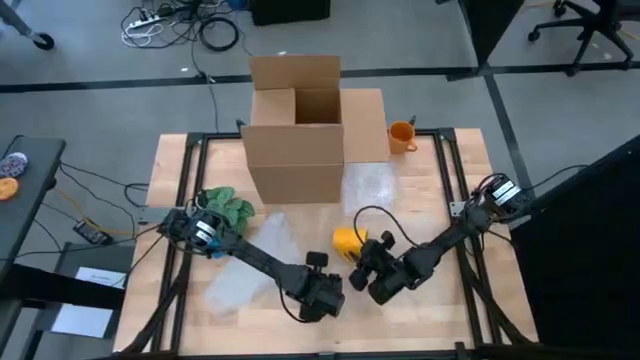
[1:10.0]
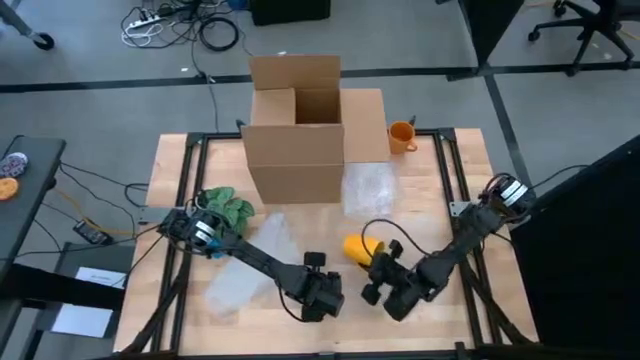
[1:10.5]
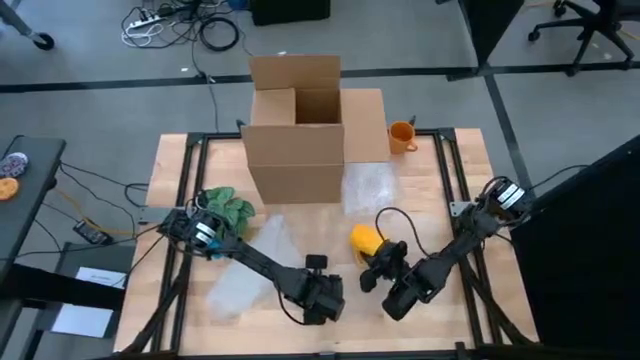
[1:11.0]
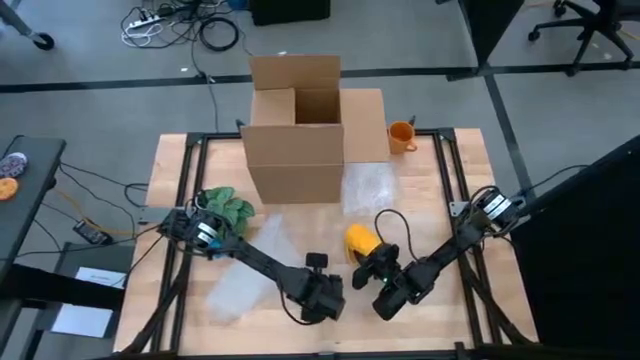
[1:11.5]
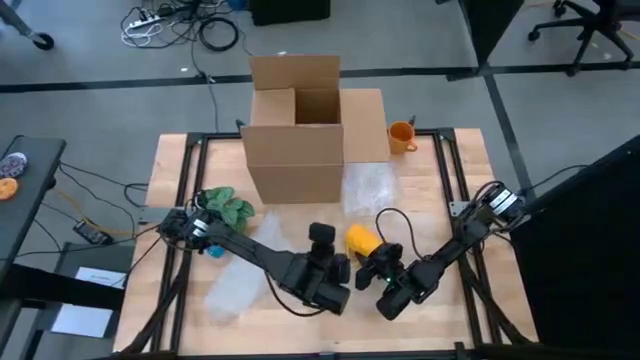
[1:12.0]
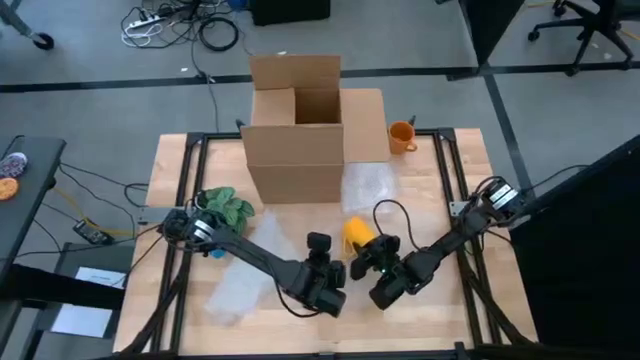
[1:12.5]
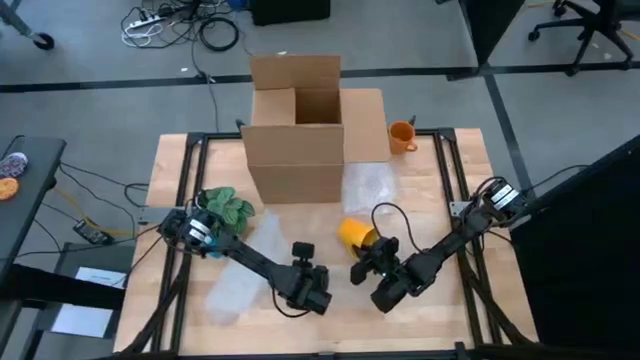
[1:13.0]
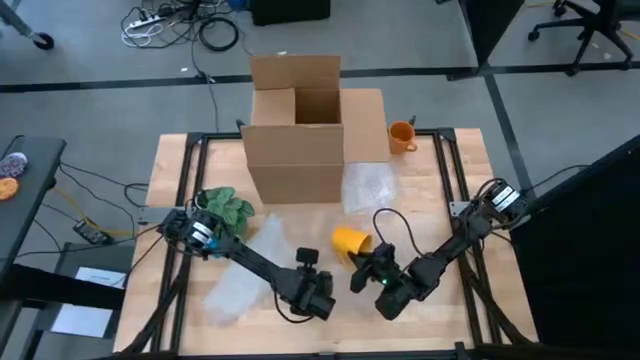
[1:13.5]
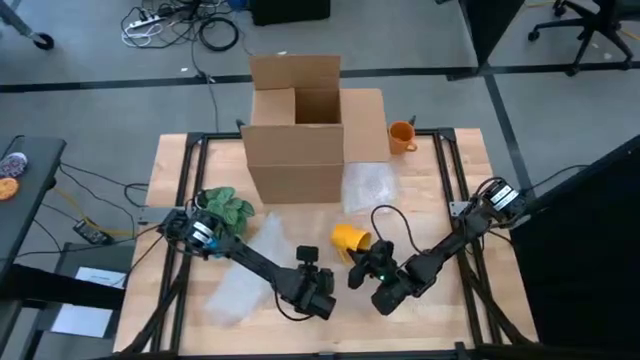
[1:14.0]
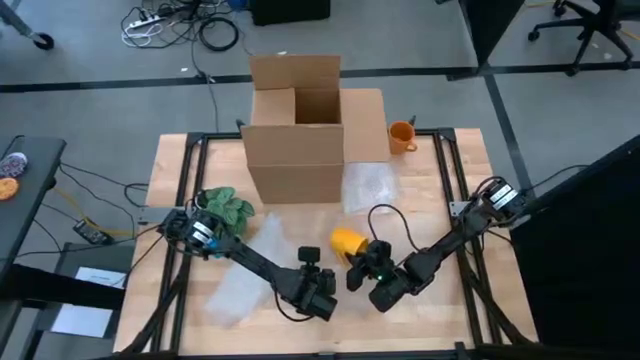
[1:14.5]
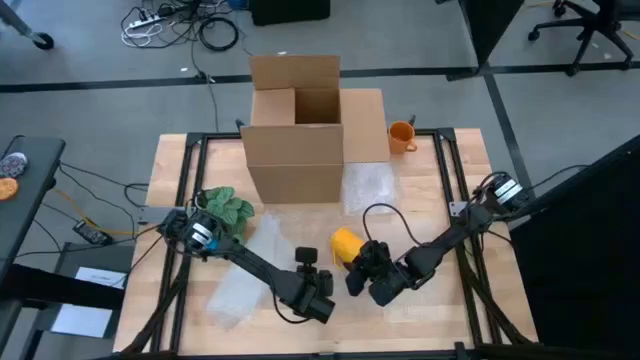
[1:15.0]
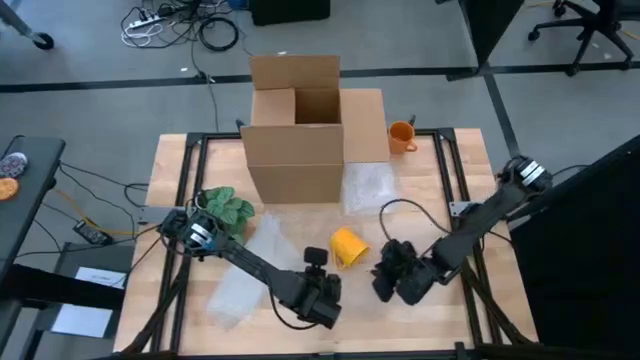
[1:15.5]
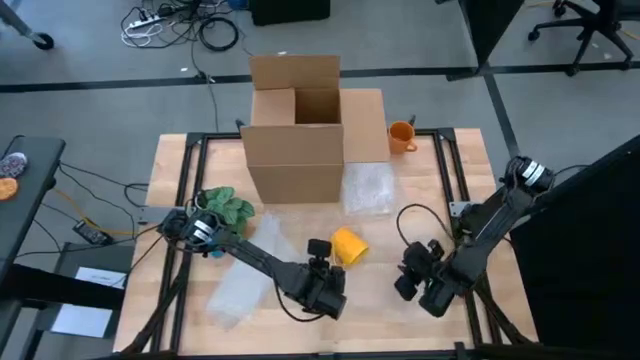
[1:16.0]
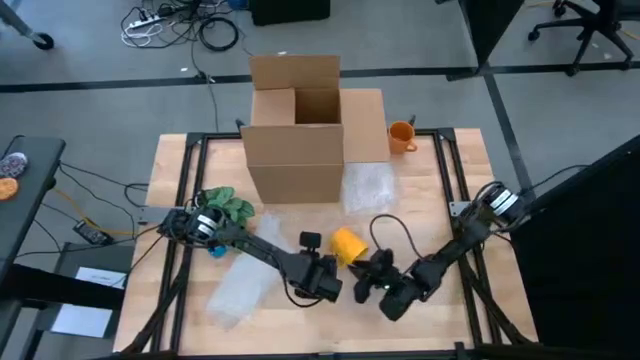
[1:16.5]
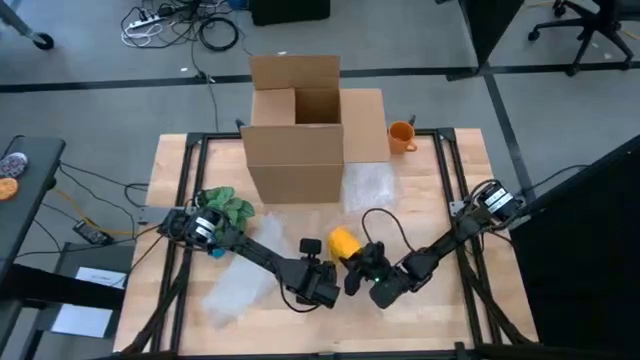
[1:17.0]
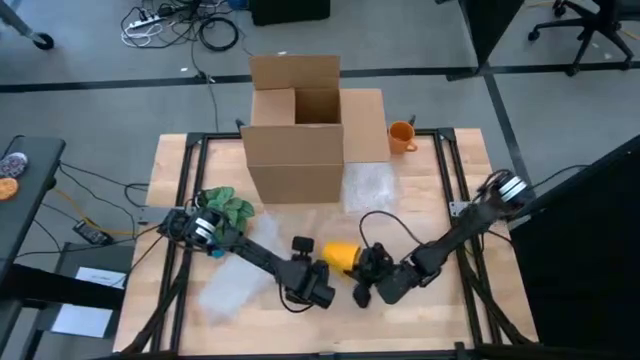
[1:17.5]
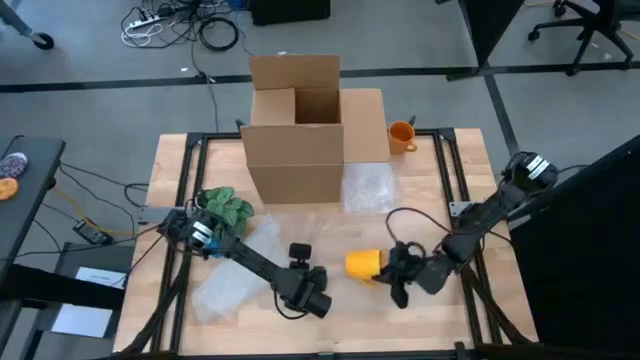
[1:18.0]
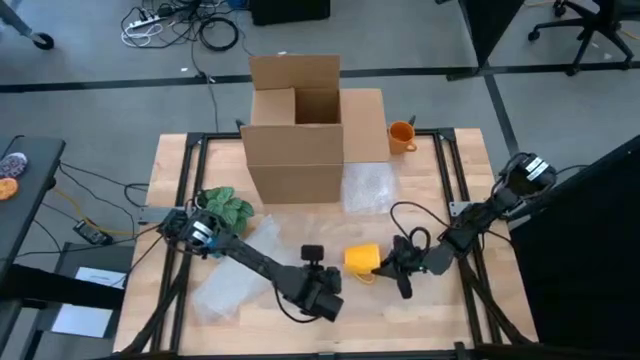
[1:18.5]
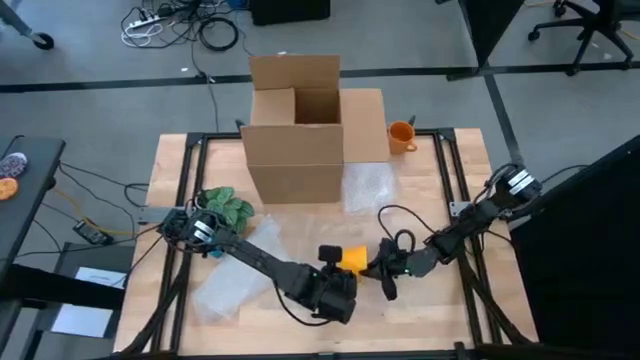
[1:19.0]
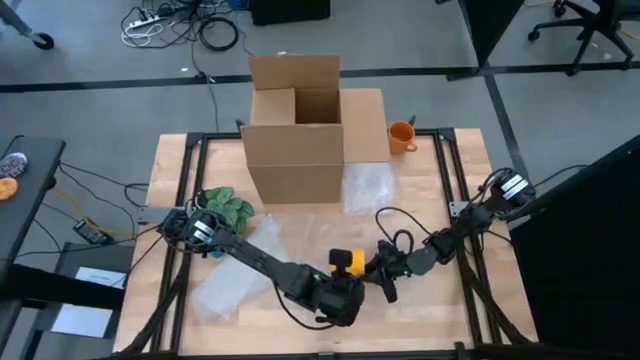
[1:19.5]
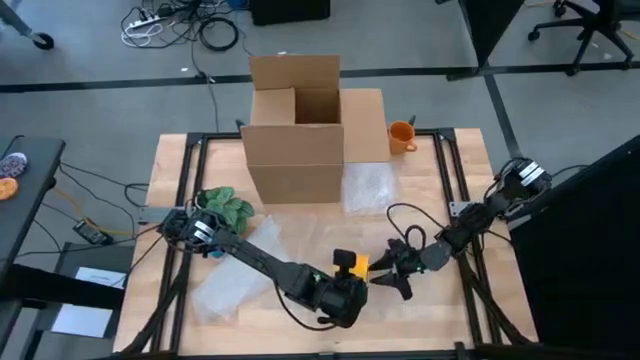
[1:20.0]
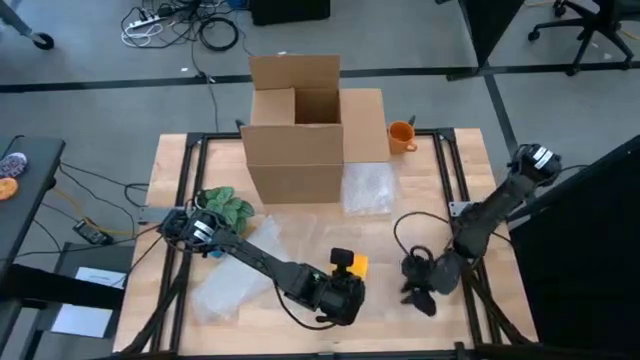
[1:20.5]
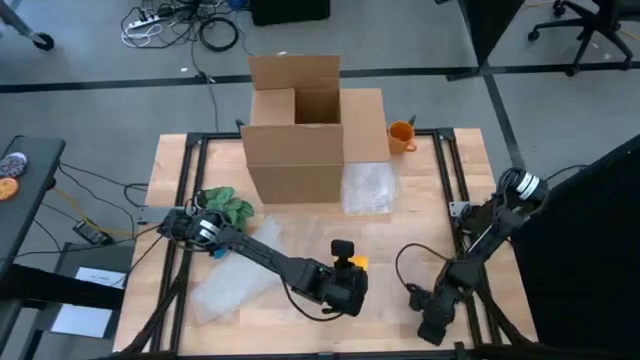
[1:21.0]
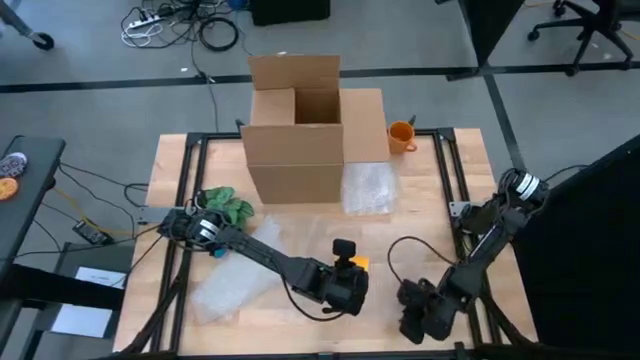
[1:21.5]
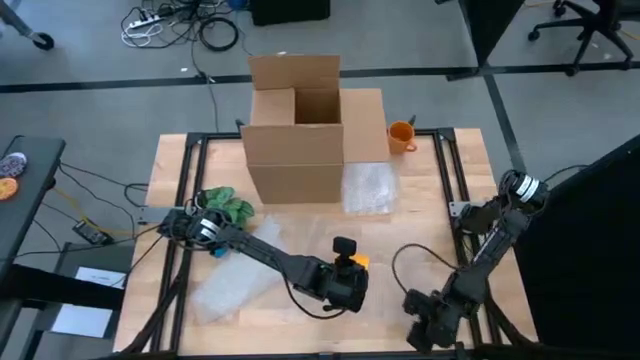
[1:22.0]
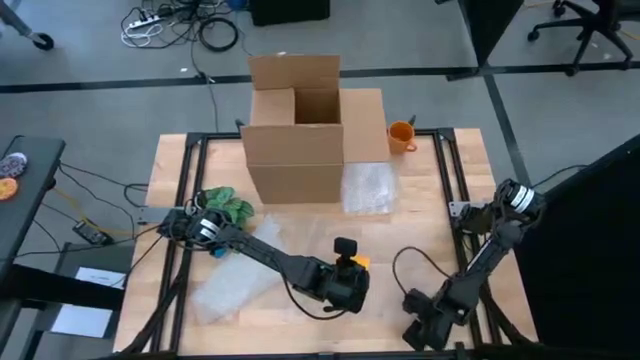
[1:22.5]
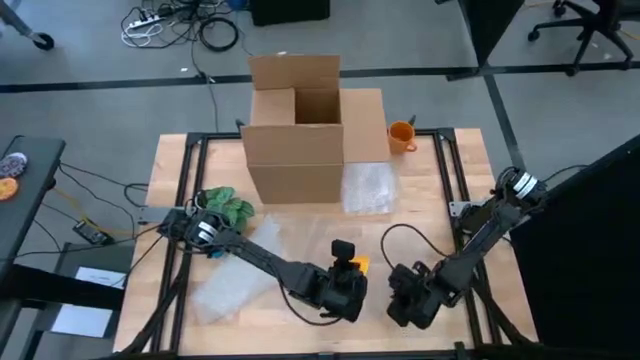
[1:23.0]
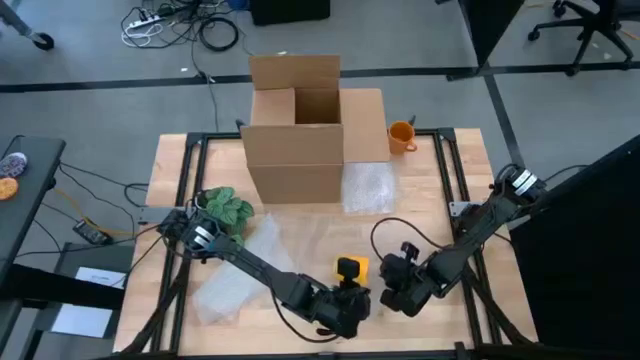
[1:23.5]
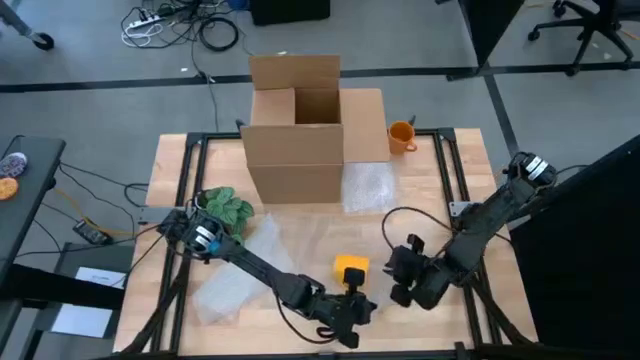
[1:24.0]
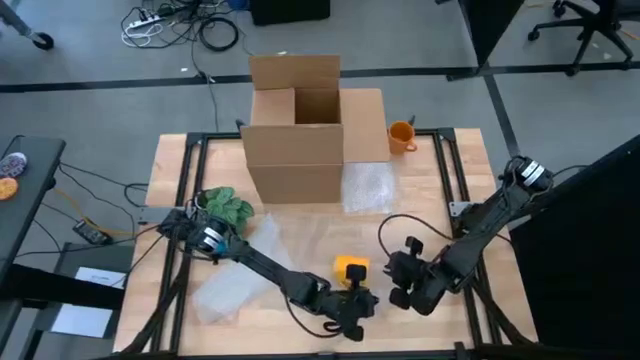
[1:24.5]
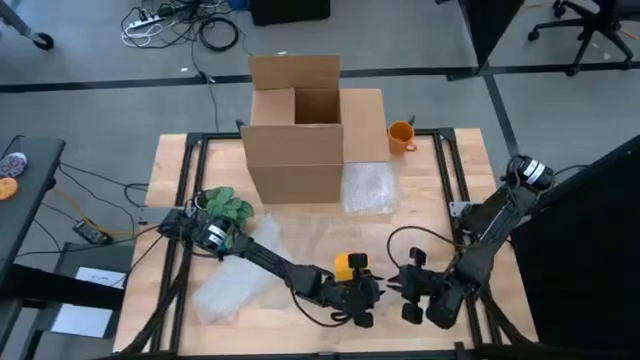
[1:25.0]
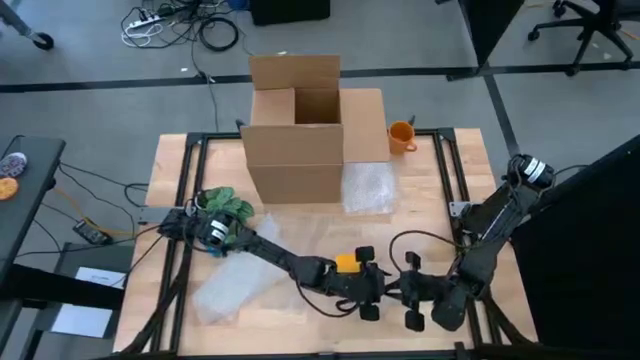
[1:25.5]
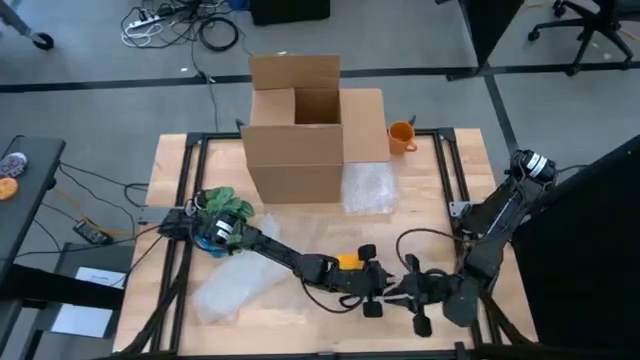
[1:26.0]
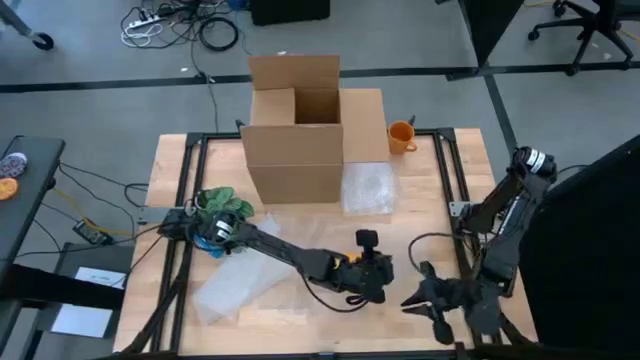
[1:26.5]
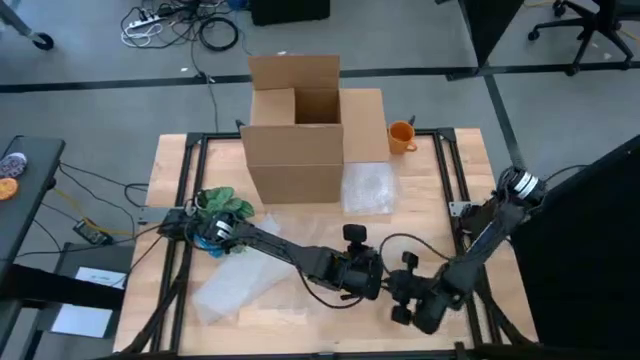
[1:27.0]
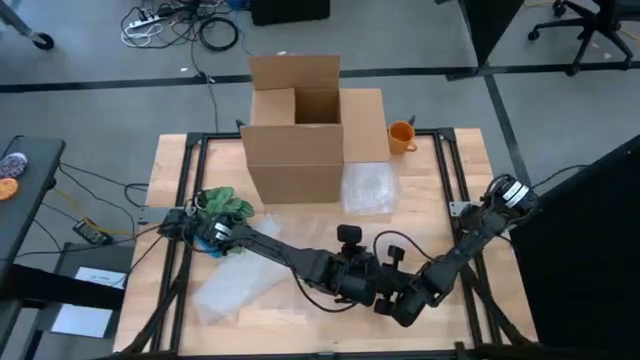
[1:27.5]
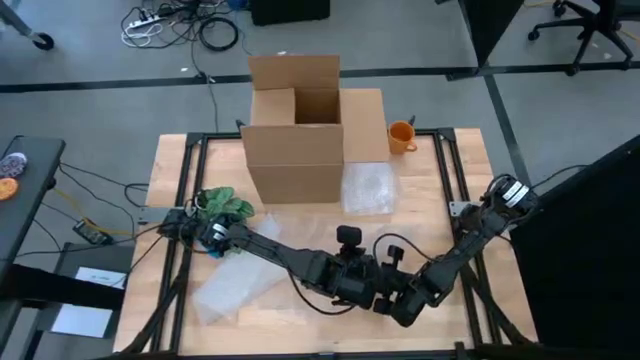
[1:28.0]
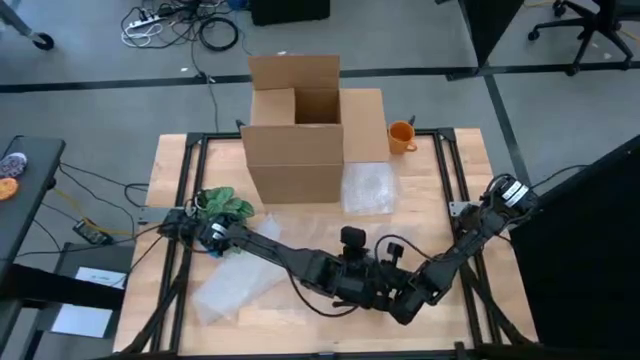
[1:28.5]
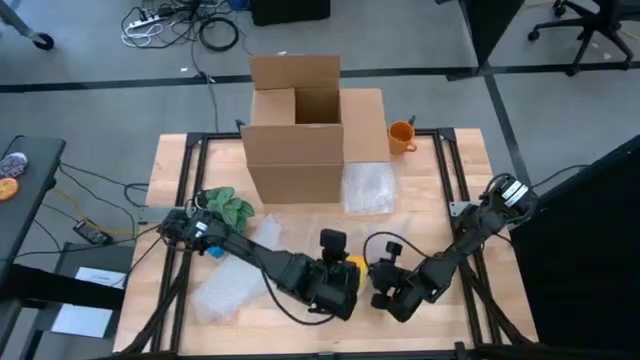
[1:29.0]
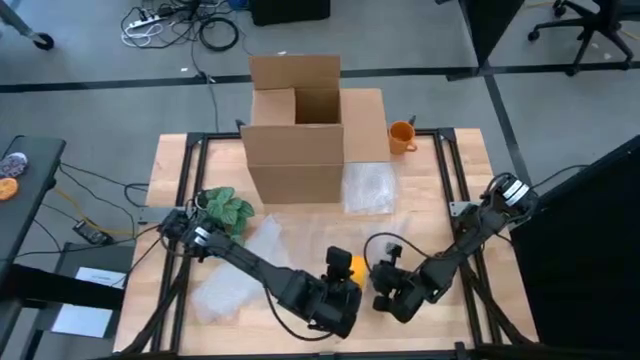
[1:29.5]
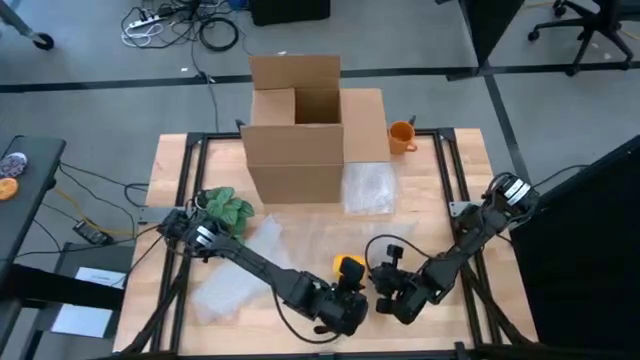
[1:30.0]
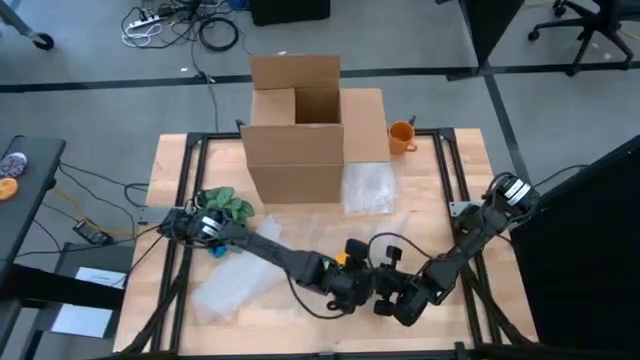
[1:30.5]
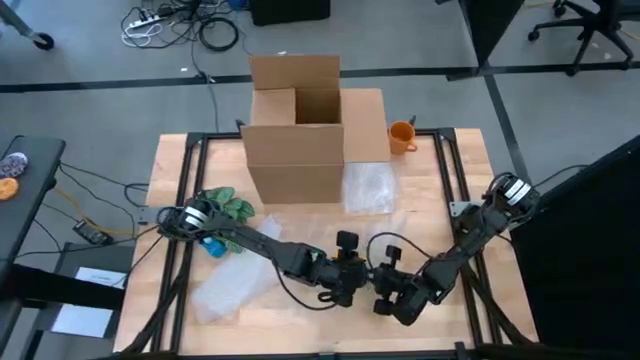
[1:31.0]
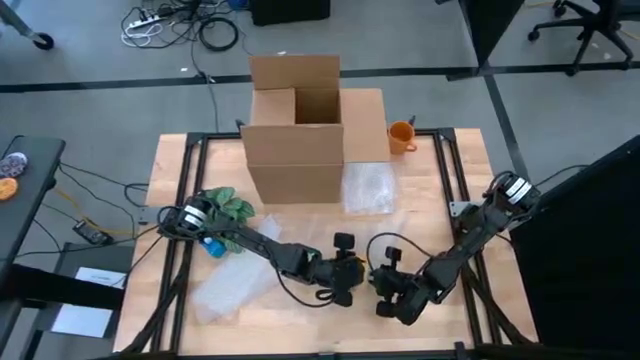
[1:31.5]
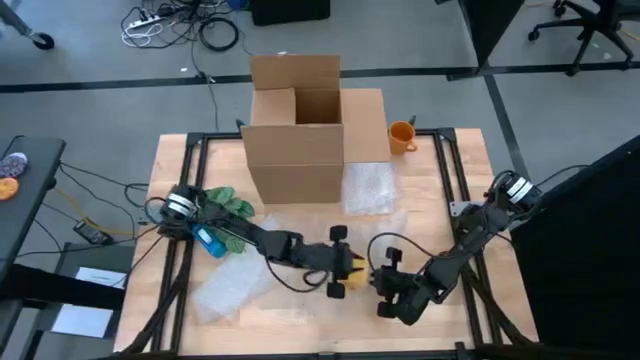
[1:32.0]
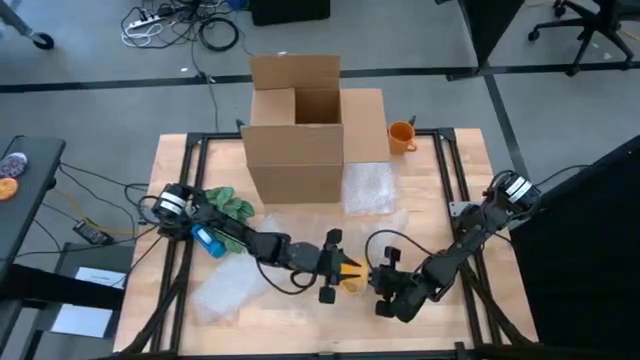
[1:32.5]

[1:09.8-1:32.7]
Task: wrap mug
Wrap the yellow mug with the bubble wrap
